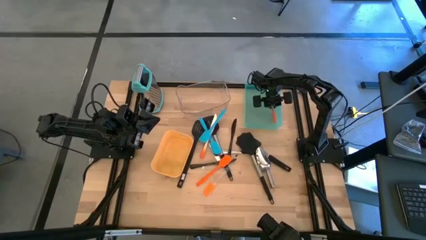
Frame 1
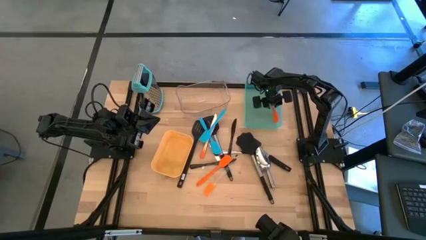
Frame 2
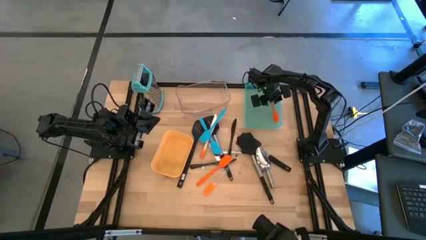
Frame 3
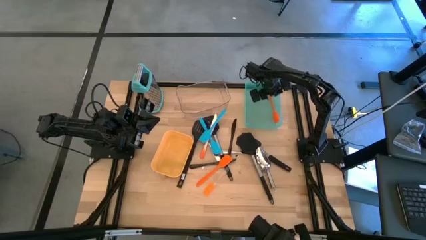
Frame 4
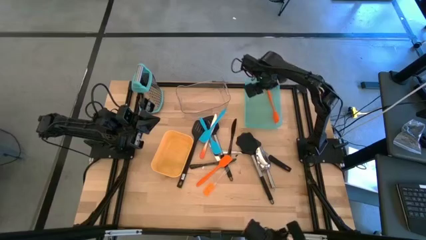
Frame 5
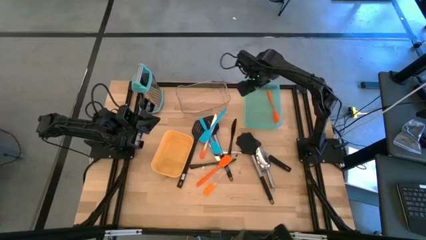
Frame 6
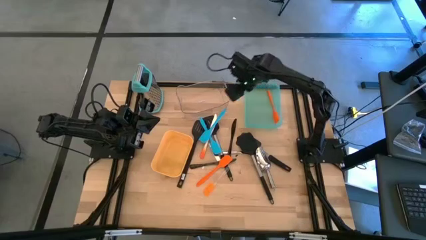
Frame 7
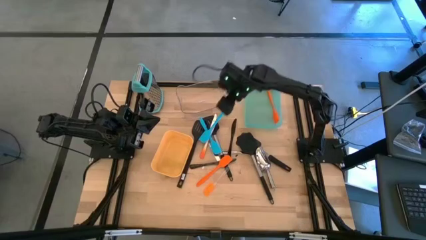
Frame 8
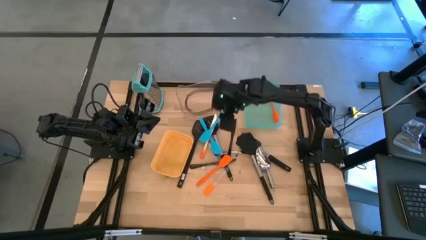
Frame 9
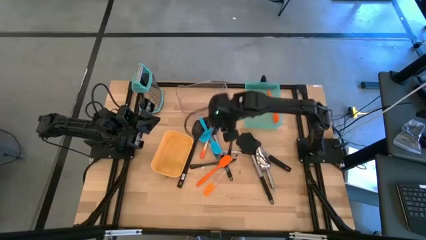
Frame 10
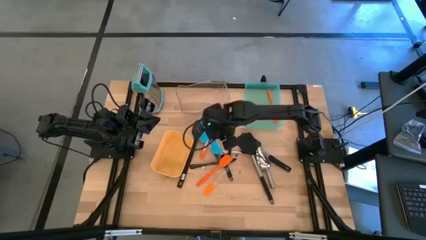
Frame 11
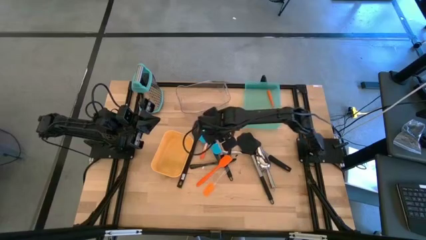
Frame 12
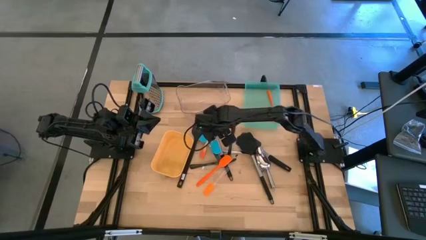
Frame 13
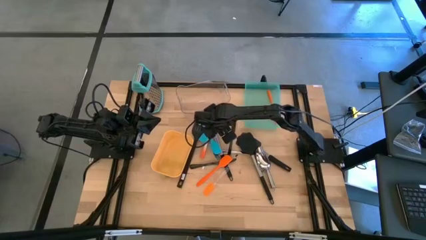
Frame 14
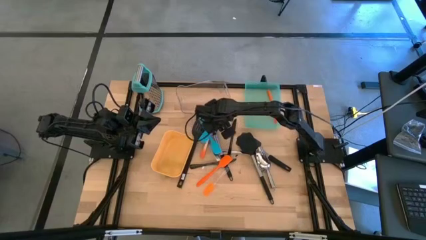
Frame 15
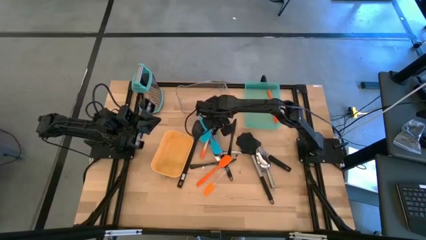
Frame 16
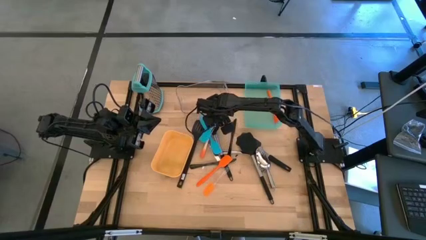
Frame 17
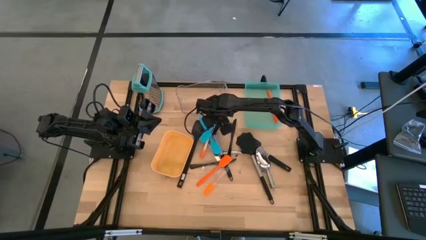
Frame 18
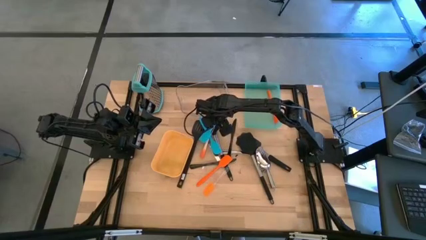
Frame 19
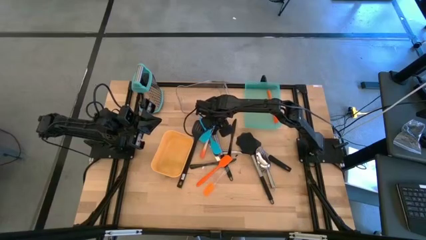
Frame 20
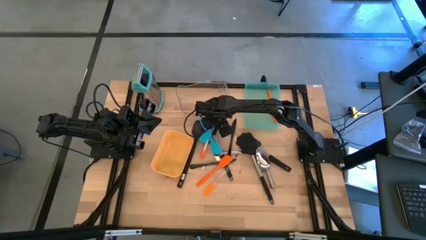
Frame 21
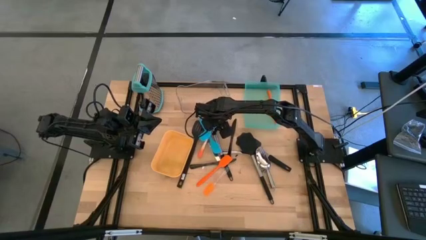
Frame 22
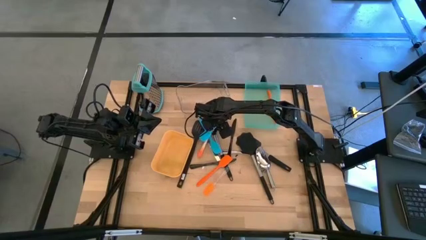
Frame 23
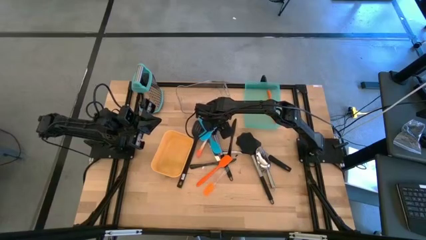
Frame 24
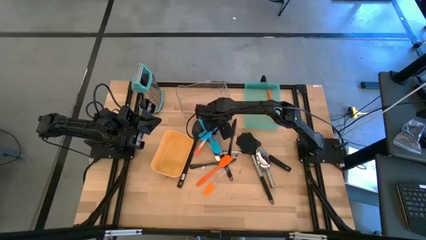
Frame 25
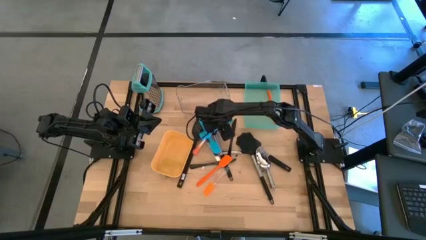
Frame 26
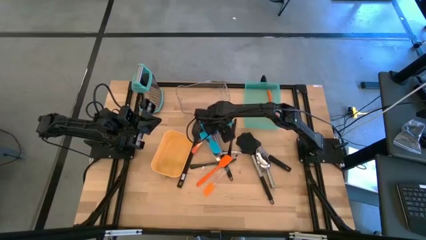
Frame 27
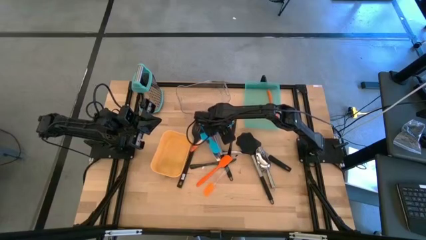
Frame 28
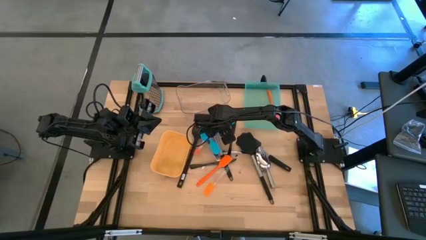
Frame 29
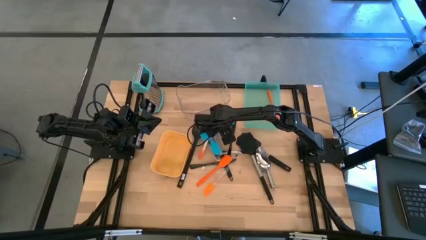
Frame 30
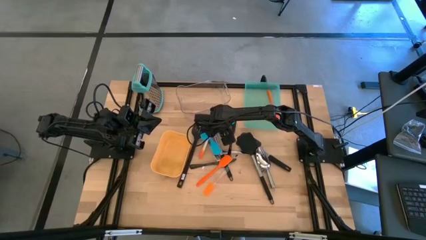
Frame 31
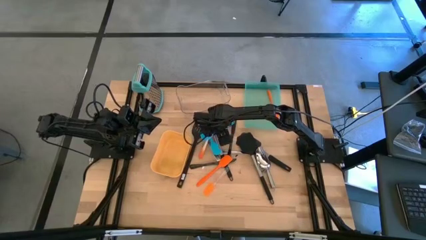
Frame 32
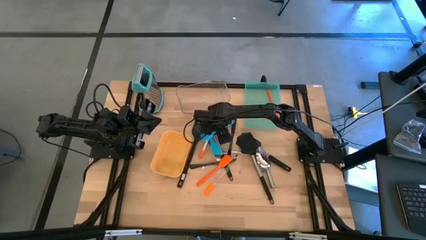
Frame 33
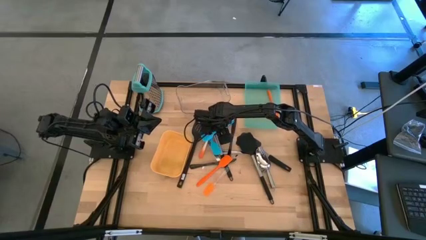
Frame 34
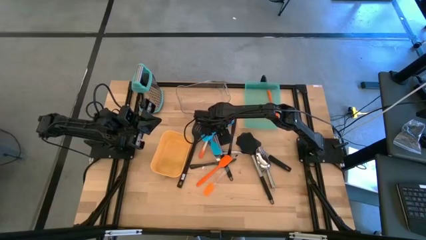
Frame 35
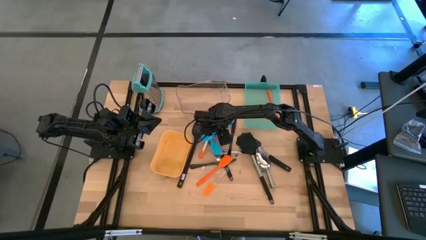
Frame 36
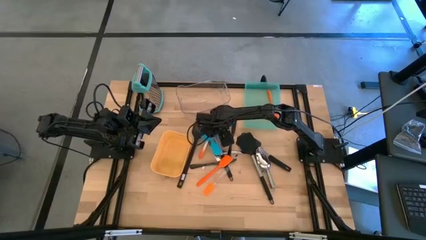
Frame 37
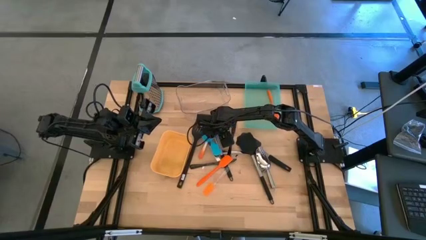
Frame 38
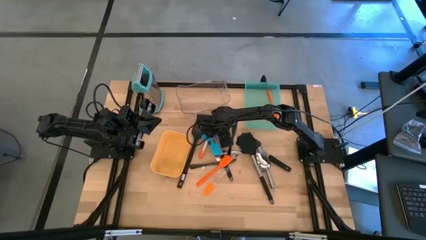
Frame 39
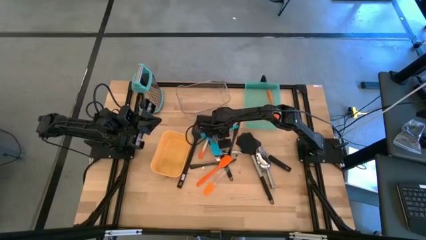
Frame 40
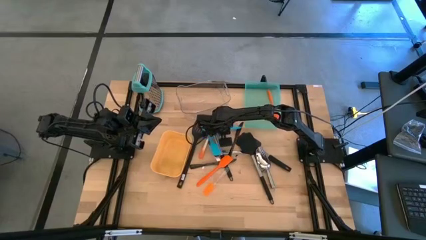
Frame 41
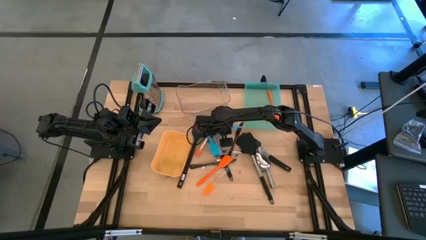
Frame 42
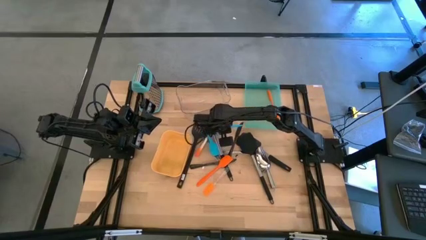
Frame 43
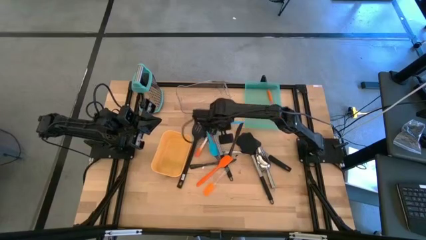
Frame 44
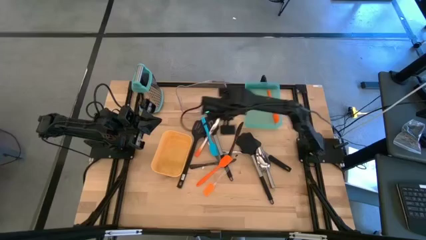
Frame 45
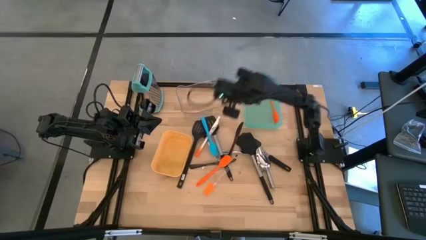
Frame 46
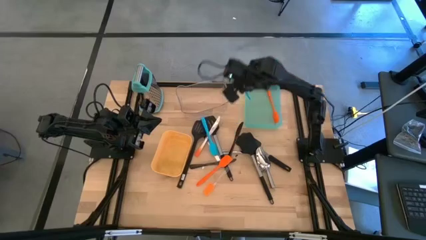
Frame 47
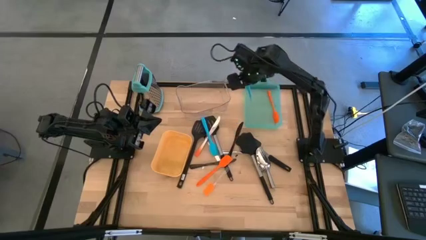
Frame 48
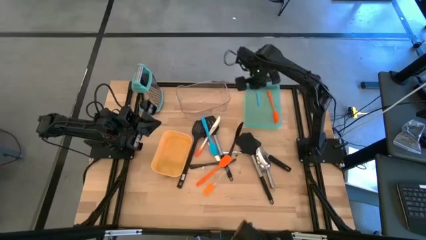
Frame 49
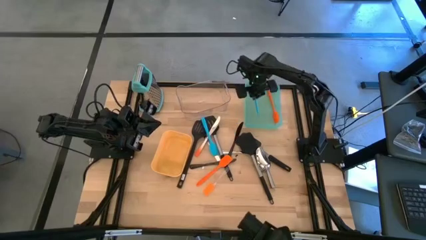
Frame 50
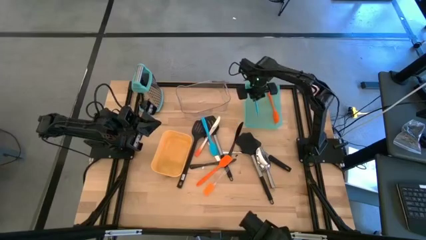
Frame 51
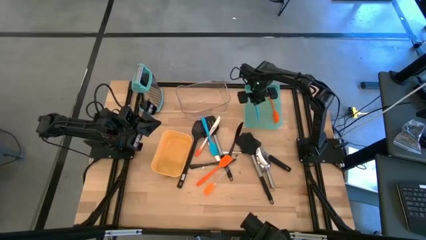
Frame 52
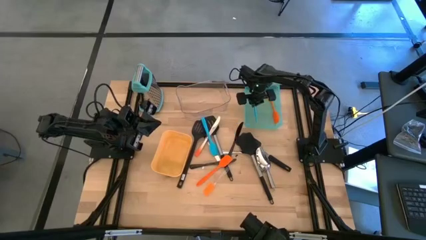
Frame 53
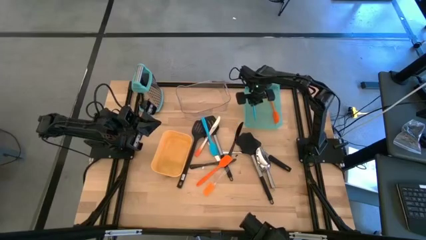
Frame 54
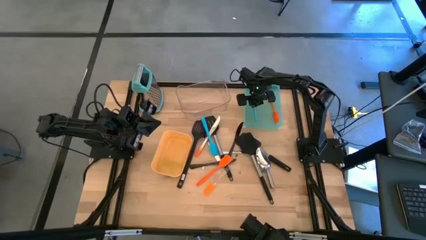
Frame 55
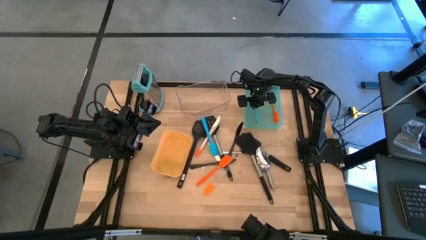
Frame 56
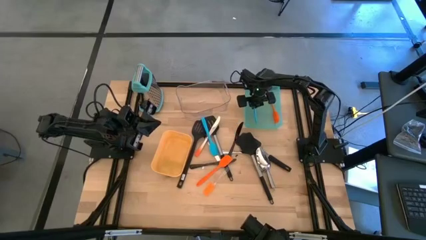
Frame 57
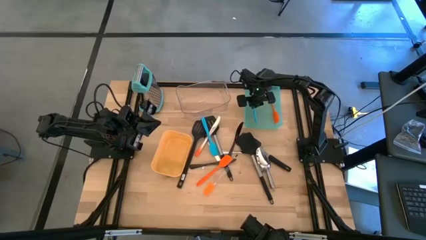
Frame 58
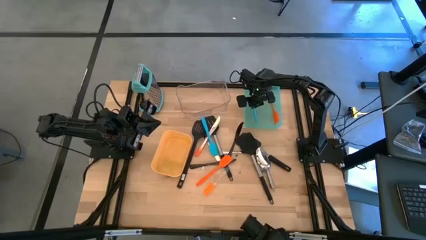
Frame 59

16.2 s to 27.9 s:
Task: Pick & Place Kitchen Items
Put the blue spatula into the green bin
